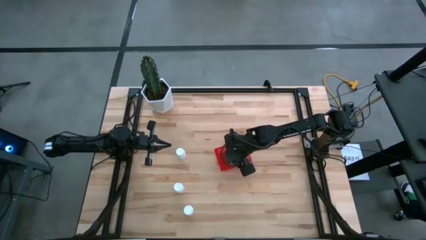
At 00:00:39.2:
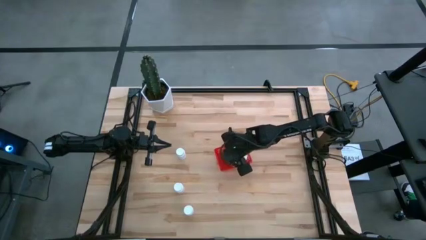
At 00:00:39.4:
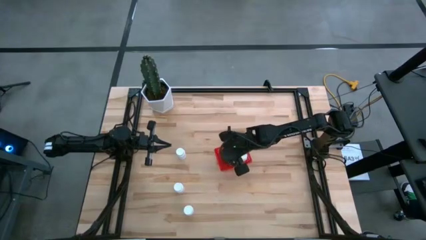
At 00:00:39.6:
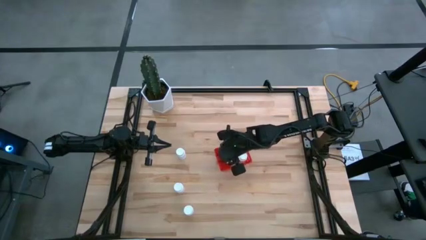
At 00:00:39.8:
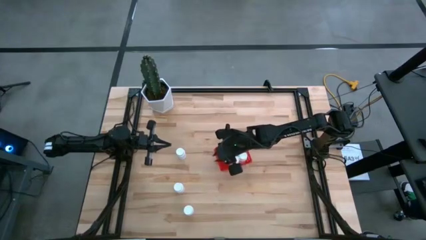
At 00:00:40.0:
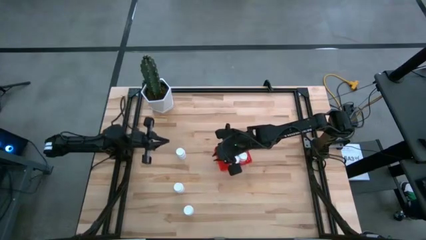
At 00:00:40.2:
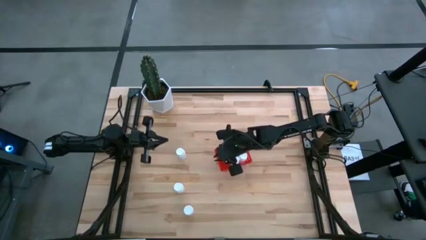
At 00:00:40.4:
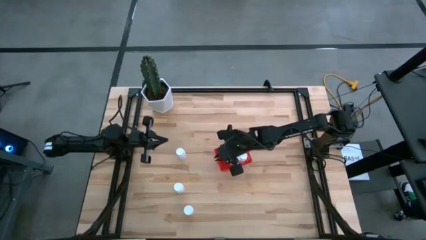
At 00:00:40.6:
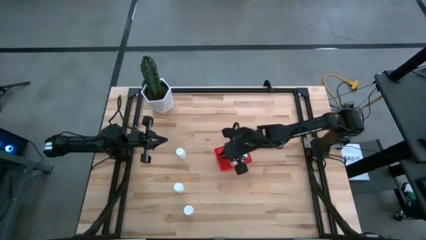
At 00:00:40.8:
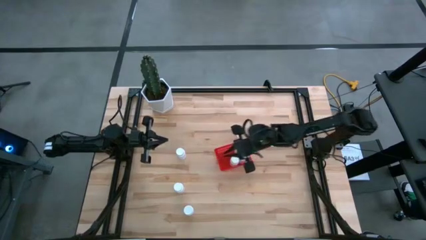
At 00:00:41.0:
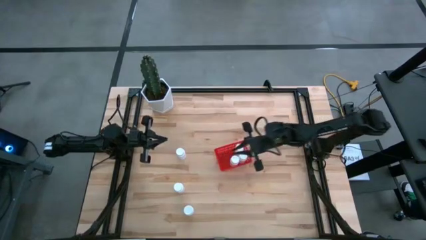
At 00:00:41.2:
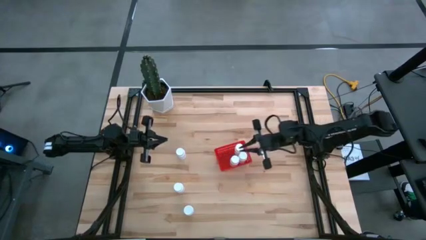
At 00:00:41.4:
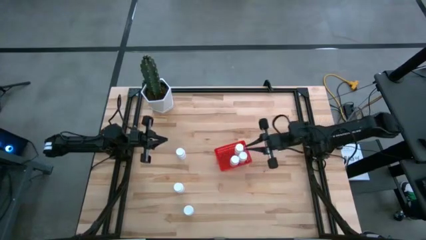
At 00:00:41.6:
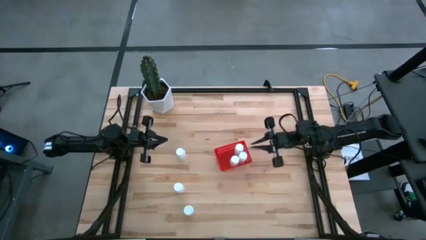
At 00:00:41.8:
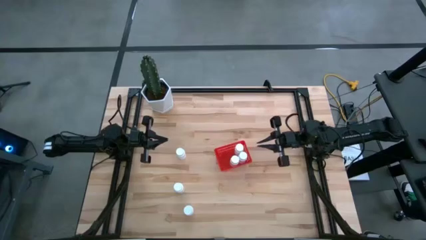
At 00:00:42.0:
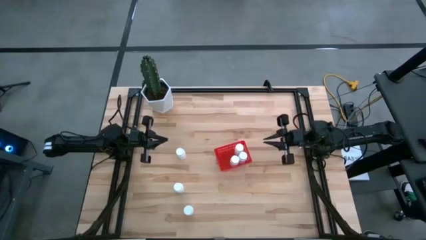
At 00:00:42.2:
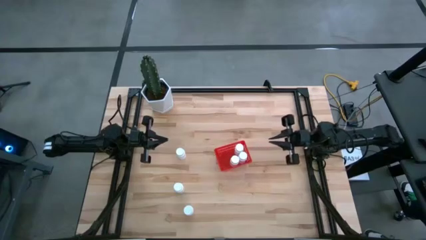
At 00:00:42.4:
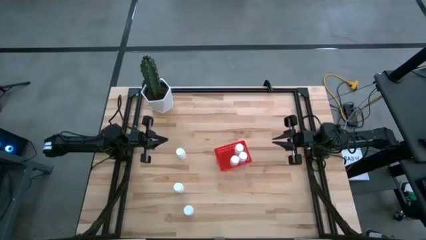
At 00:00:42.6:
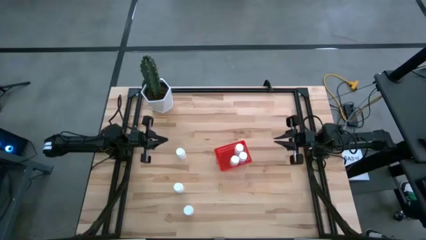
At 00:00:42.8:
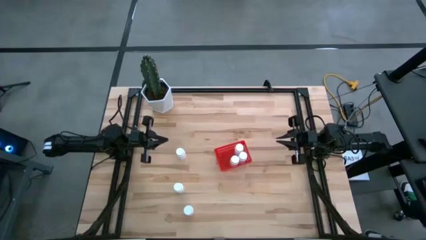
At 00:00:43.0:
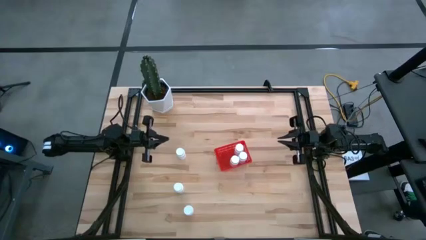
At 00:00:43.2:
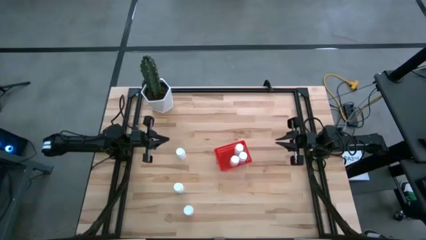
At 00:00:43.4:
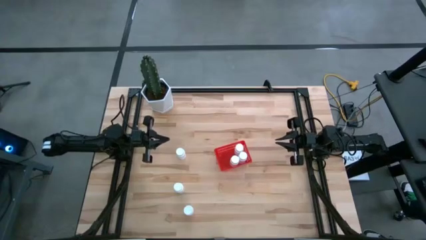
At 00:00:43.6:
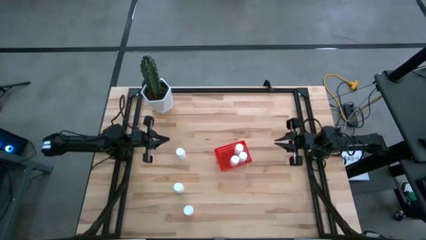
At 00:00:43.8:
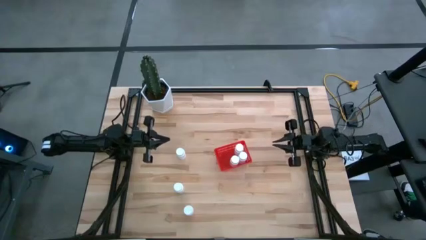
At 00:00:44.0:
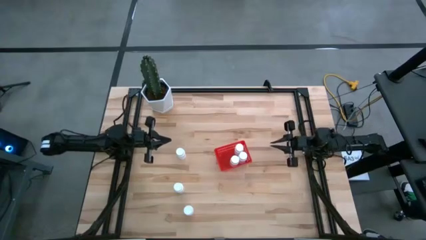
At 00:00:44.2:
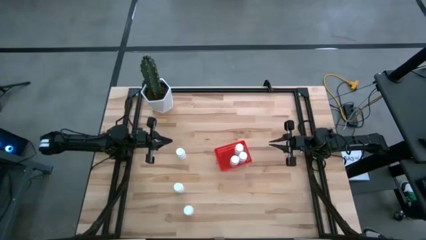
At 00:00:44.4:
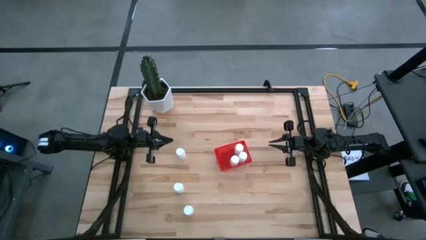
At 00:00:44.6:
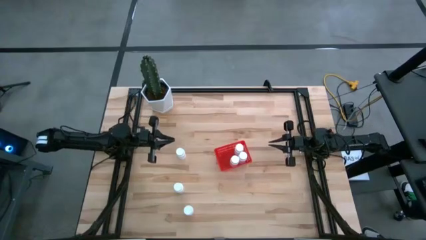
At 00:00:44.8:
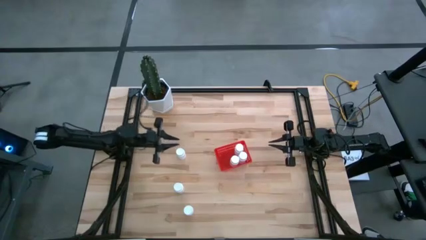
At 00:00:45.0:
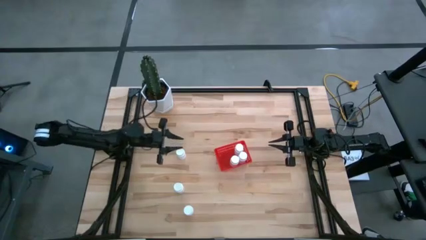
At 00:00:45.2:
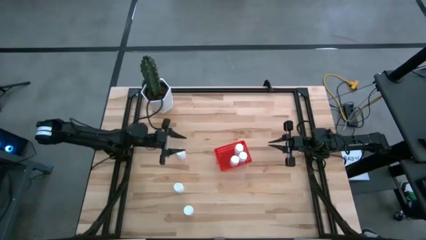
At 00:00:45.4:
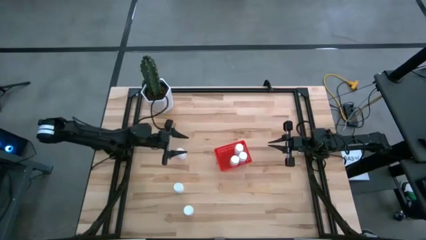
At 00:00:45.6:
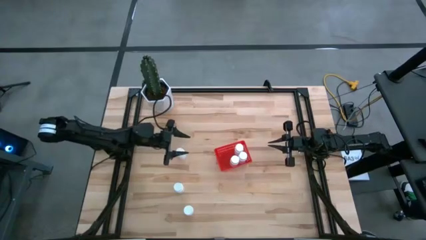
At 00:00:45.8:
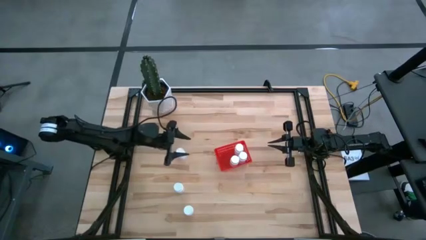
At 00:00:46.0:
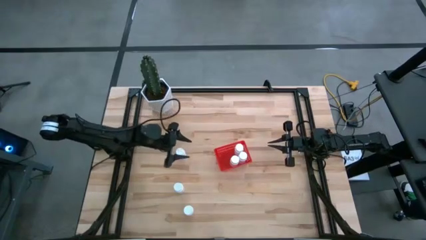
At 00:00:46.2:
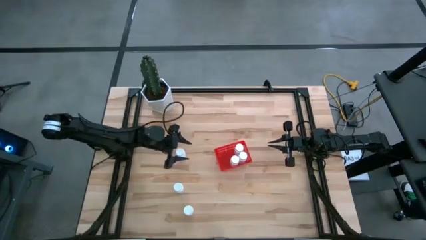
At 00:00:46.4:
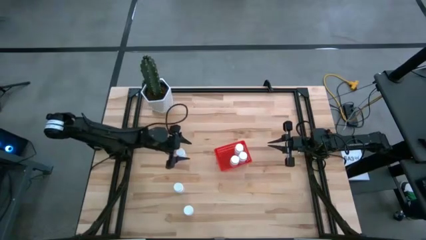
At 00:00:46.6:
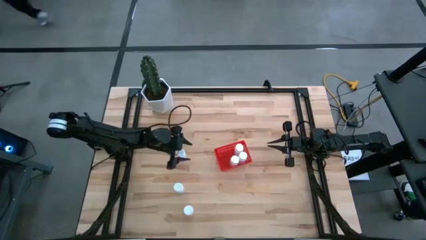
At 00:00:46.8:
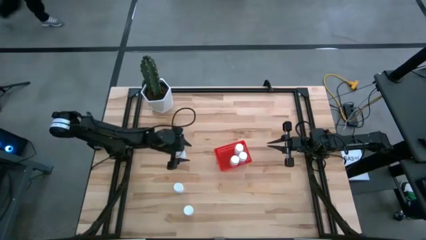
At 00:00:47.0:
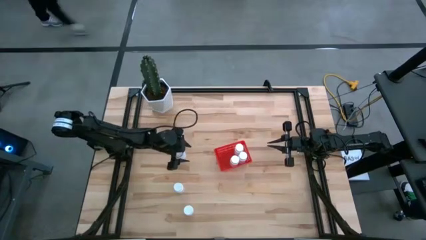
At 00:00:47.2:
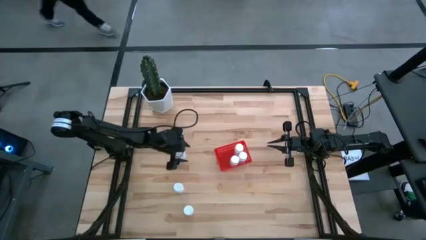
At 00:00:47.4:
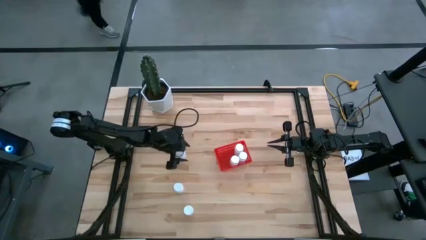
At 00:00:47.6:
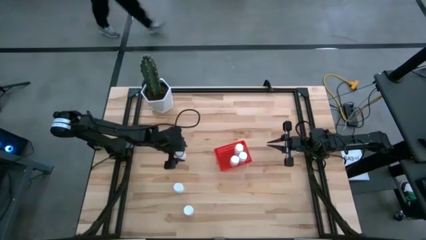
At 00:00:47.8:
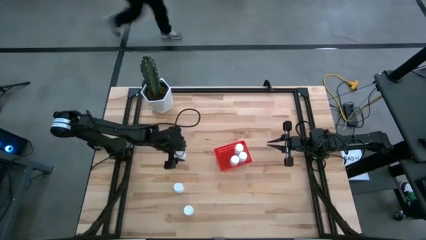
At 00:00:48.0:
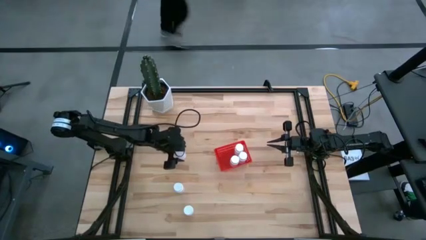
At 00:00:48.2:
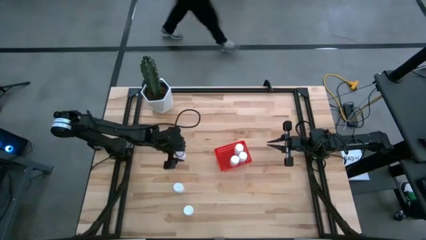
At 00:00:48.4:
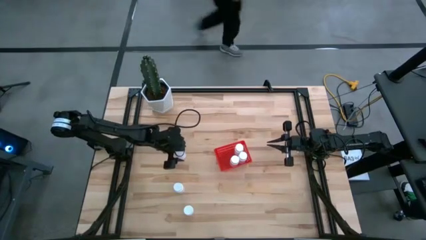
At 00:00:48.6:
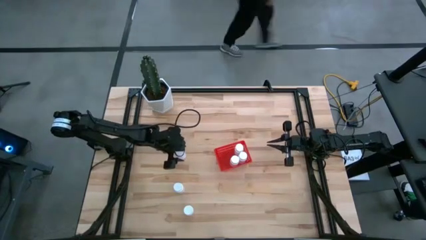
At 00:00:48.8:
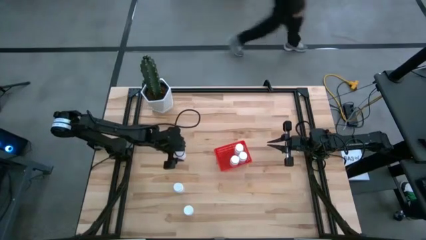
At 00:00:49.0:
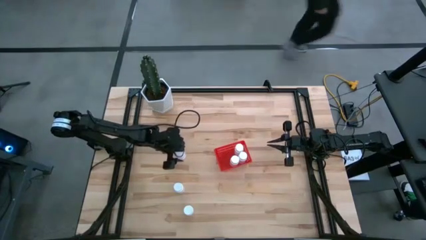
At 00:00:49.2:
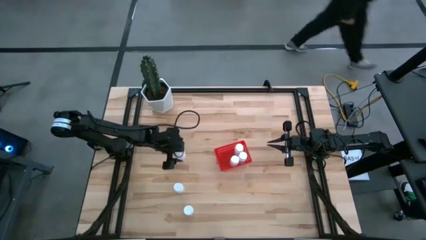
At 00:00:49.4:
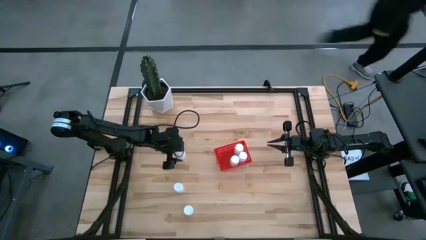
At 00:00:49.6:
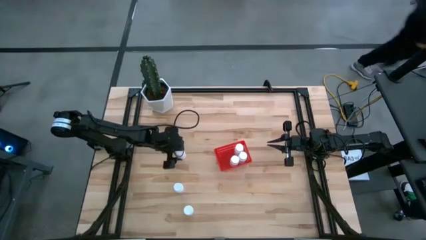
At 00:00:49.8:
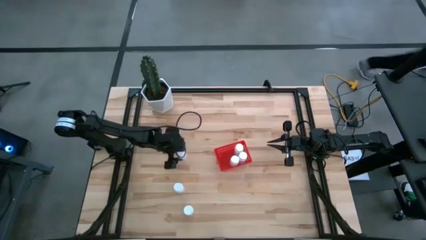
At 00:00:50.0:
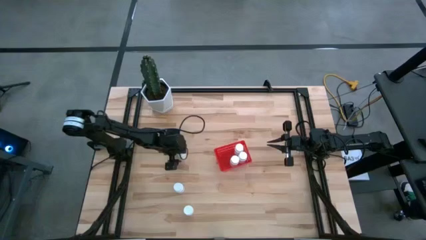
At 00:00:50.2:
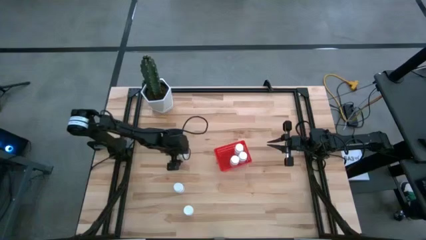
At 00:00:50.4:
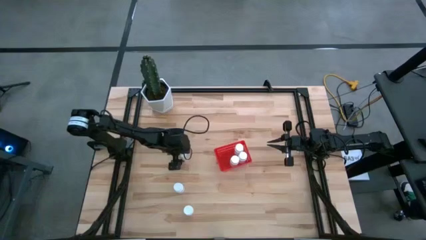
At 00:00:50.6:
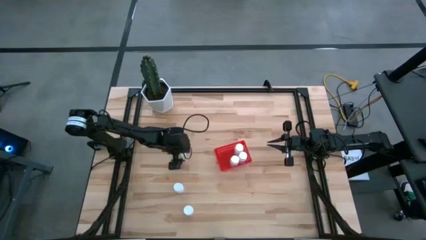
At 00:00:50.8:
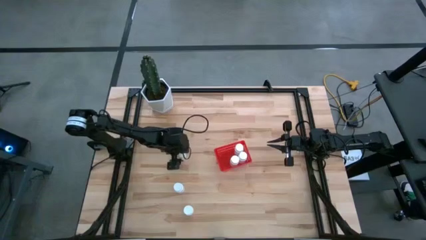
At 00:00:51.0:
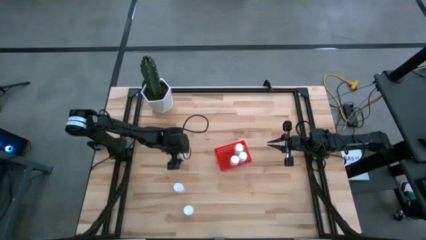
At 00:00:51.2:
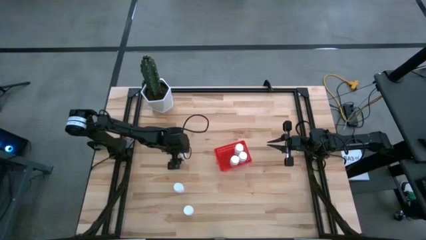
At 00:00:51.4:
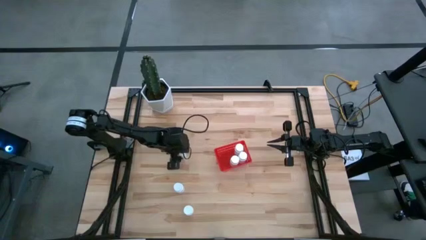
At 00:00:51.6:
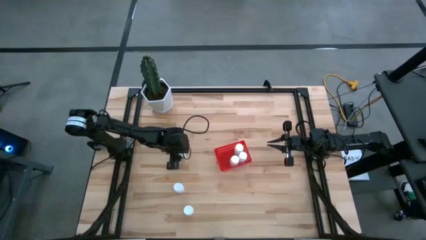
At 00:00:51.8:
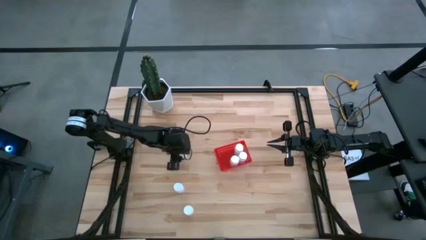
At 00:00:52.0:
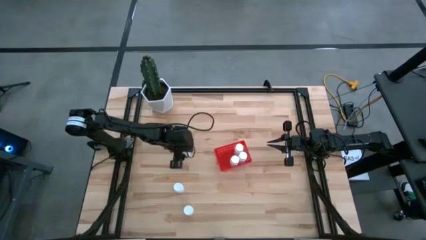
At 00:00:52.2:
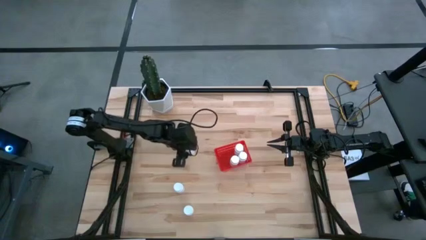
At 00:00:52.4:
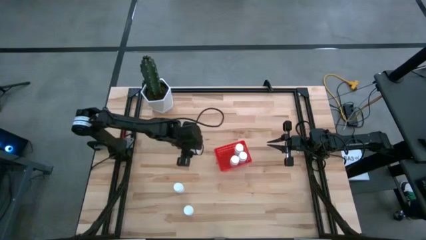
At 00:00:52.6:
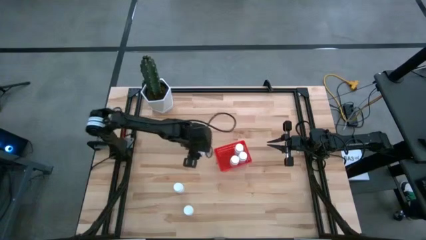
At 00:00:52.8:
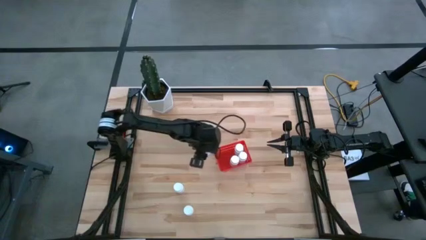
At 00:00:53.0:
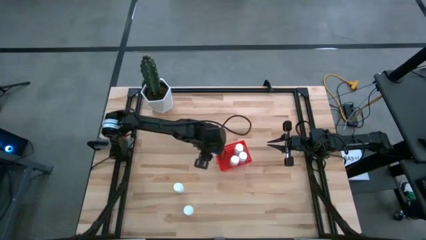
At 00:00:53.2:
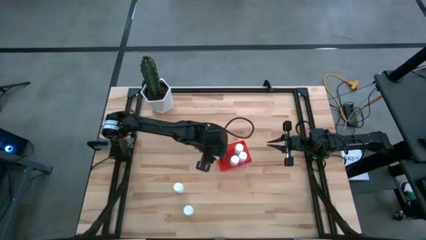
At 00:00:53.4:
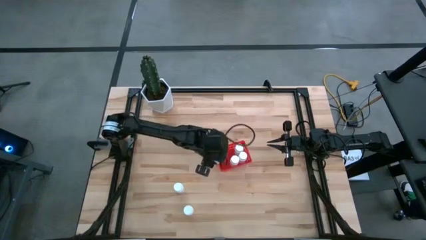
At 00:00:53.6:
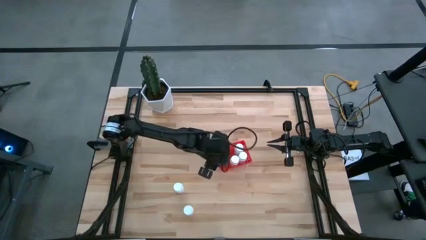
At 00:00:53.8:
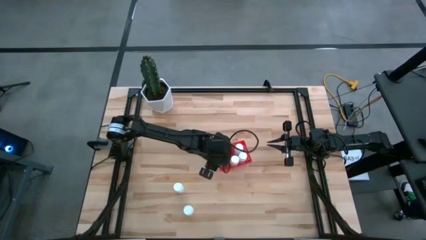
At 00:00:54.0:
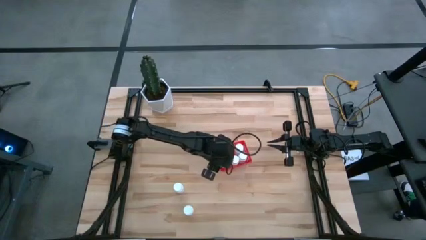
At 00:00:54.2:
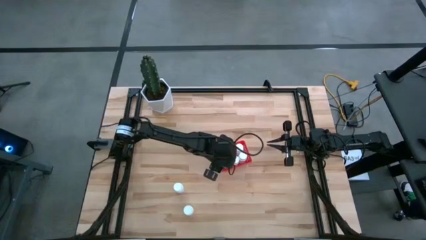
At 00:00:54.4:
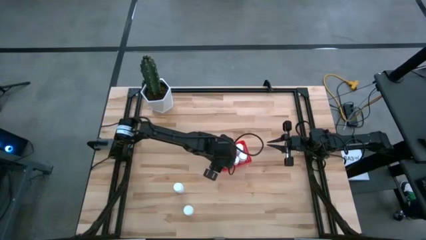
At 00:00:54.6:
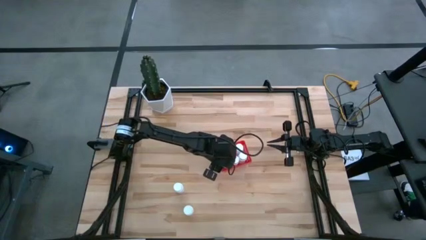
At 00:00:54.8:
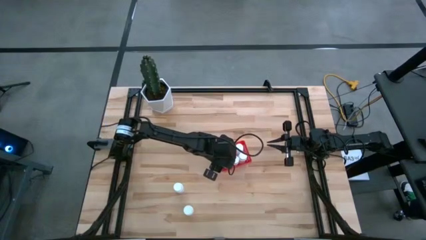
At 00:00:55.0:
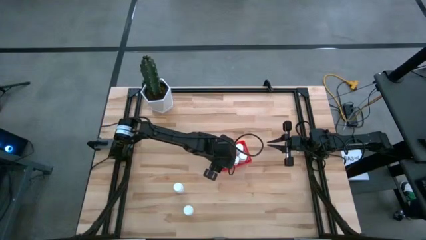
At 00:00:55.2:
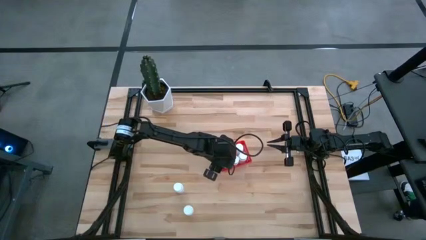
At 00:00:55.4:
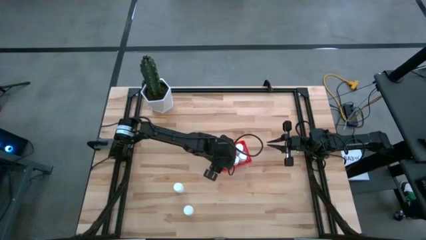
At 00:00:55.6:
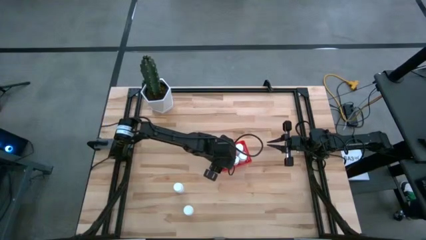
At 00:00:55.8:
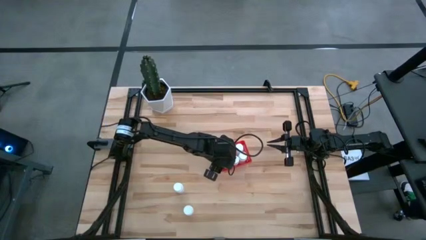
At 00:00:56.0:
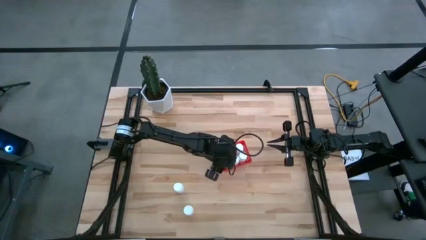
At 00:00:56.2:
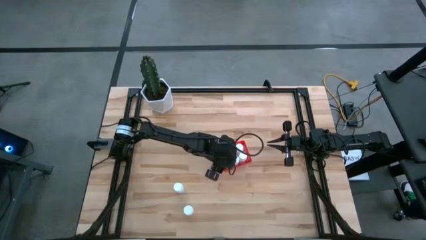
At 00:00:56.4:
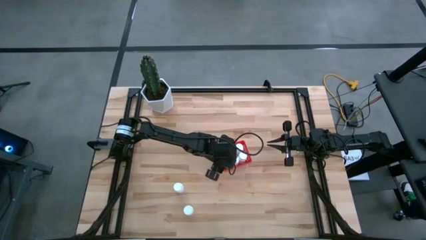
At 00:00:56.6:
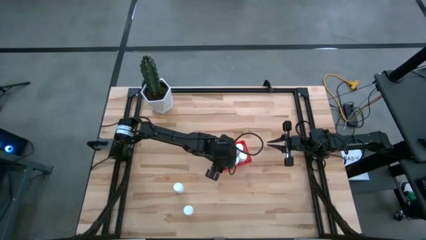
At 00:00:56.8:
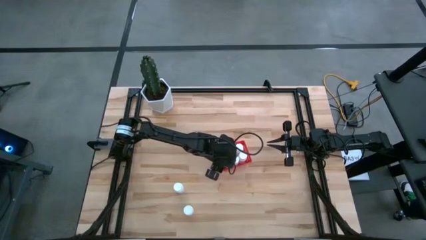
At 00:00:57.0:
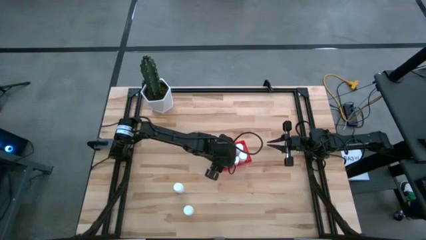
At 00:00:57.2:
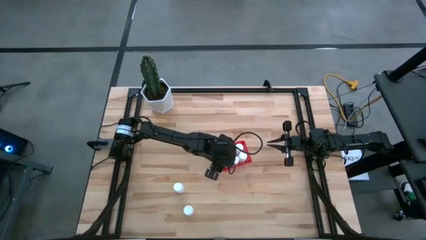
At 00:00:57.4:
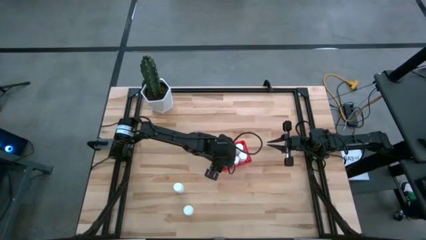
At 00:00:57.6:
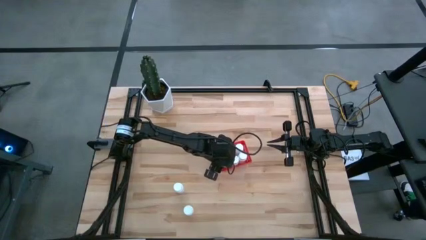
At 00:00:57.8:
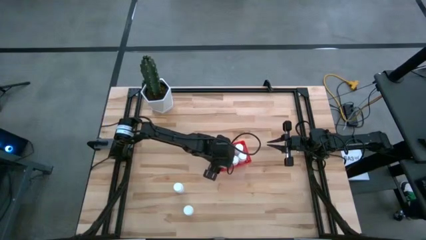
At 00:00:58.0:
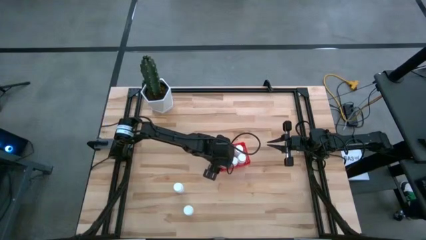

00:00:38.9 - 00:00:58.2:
Task: Pick and place pill bottles into a basket
Put the white medicine bottle into the red basket
